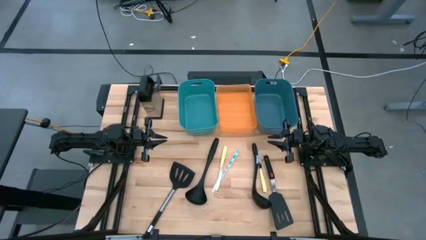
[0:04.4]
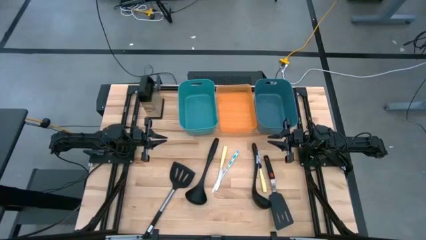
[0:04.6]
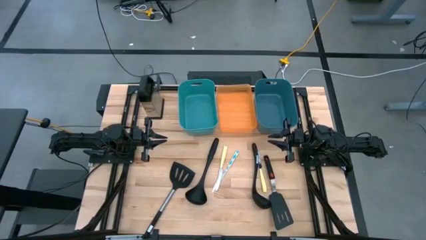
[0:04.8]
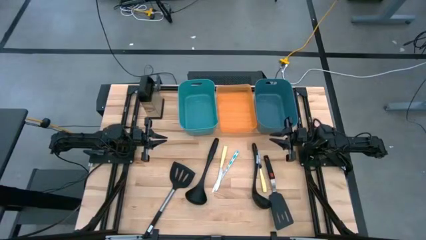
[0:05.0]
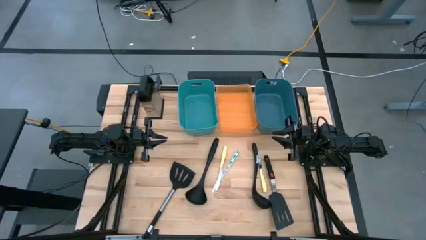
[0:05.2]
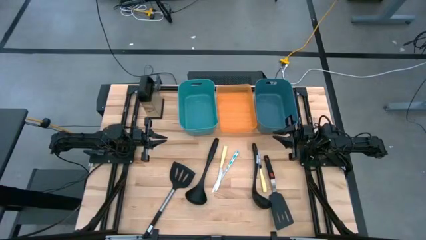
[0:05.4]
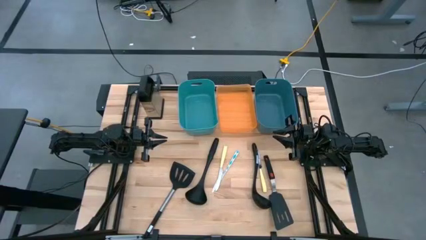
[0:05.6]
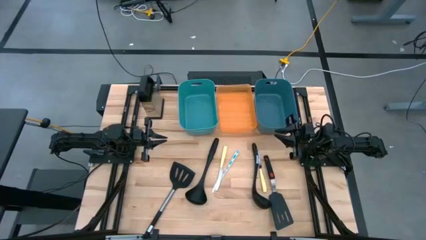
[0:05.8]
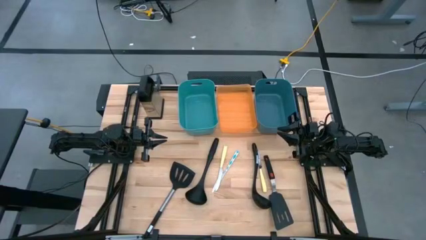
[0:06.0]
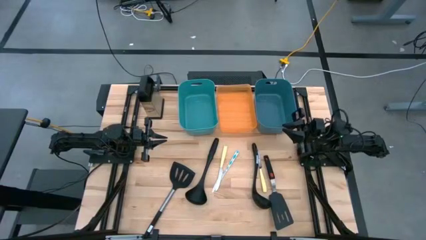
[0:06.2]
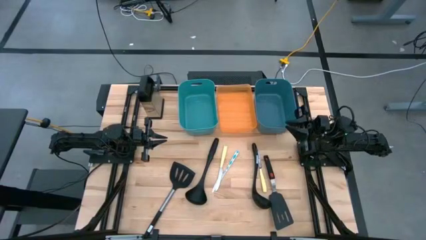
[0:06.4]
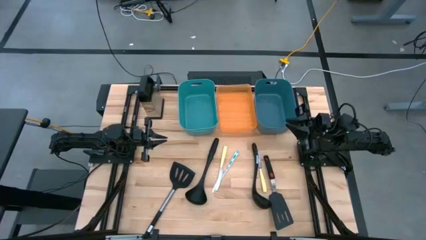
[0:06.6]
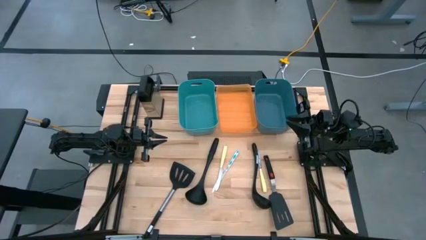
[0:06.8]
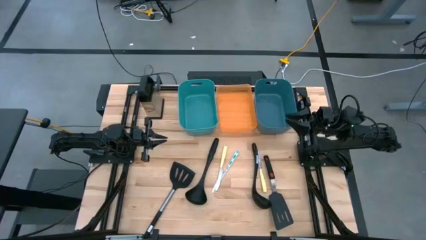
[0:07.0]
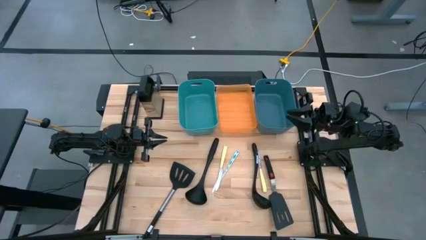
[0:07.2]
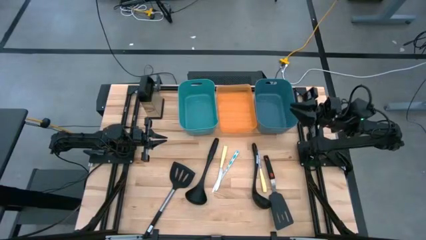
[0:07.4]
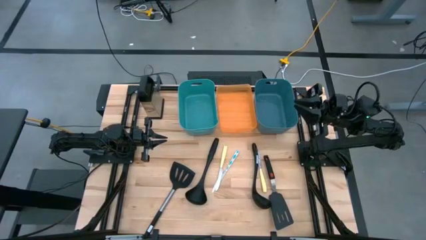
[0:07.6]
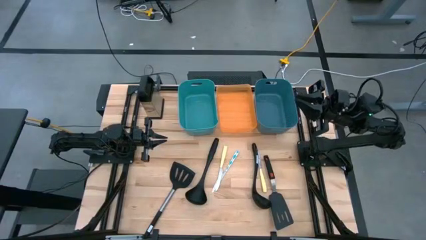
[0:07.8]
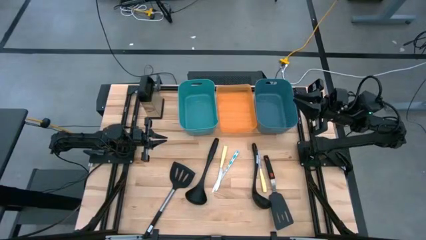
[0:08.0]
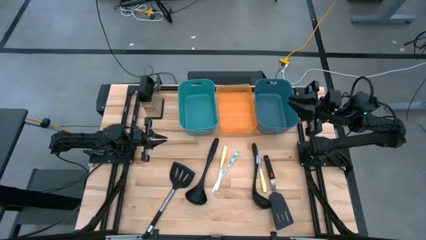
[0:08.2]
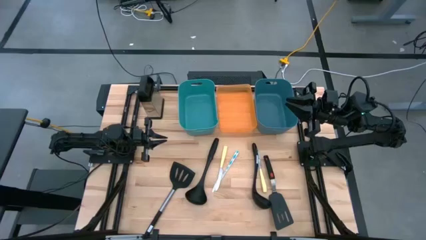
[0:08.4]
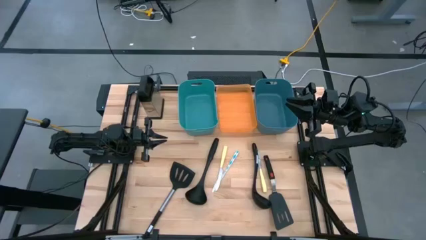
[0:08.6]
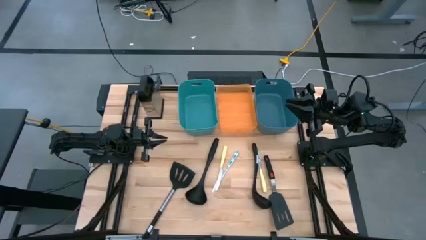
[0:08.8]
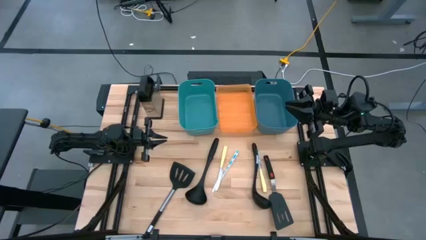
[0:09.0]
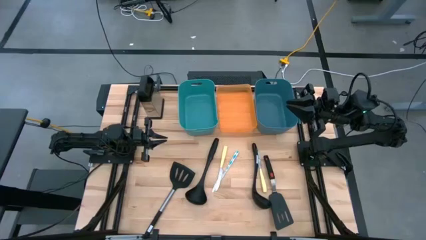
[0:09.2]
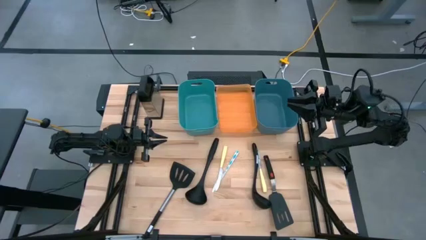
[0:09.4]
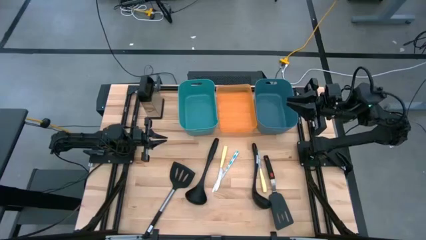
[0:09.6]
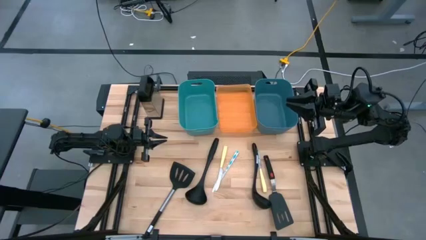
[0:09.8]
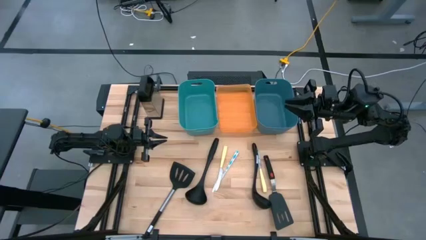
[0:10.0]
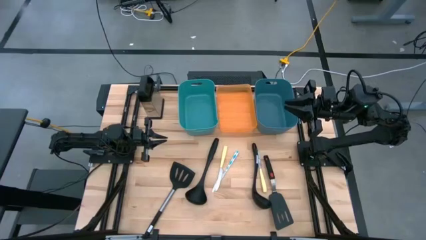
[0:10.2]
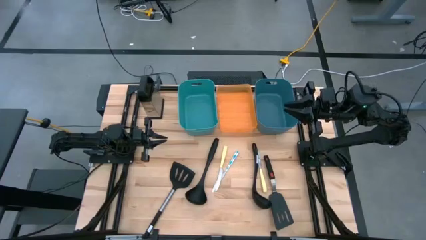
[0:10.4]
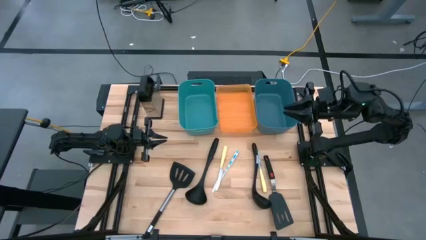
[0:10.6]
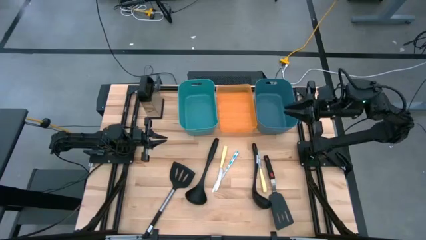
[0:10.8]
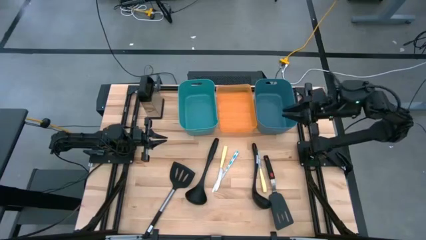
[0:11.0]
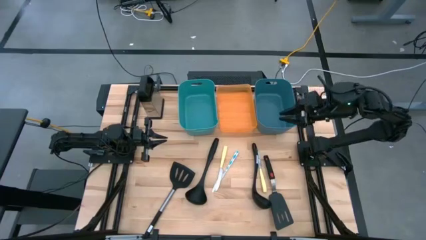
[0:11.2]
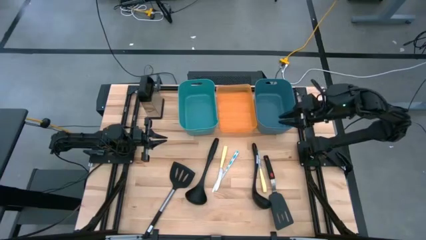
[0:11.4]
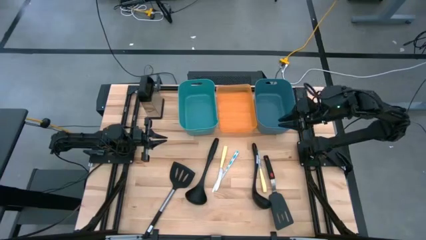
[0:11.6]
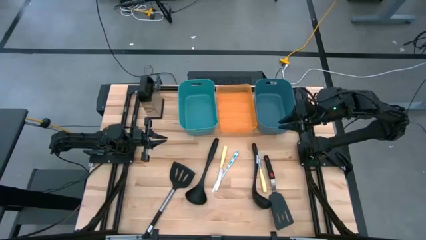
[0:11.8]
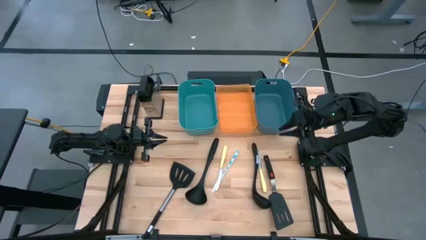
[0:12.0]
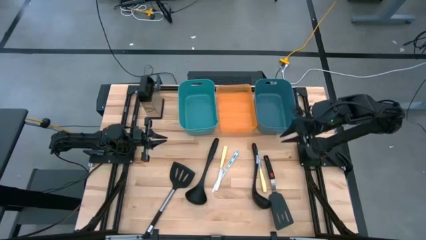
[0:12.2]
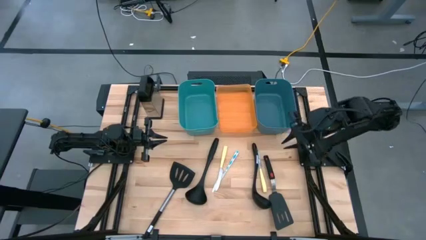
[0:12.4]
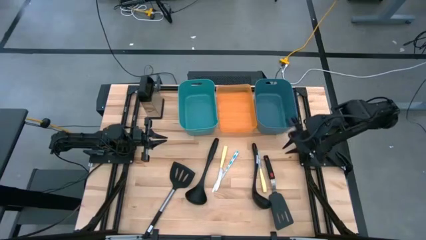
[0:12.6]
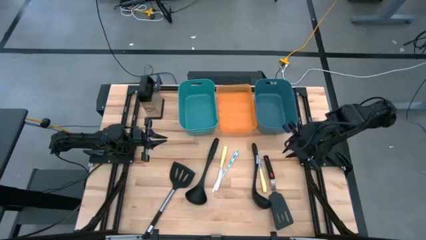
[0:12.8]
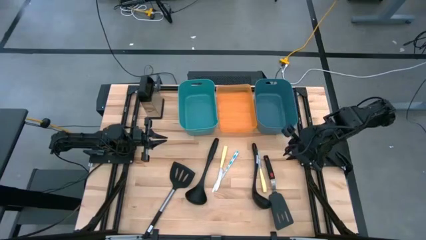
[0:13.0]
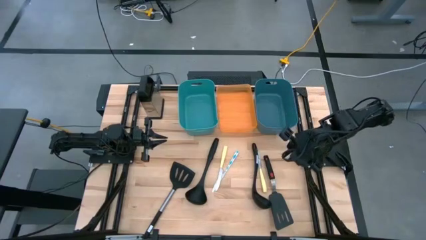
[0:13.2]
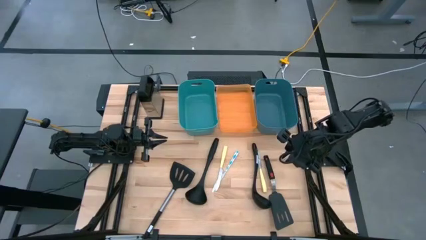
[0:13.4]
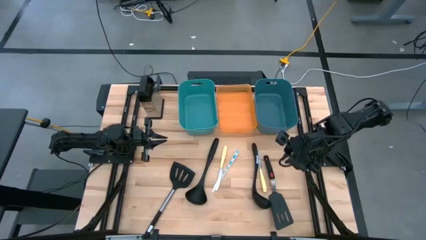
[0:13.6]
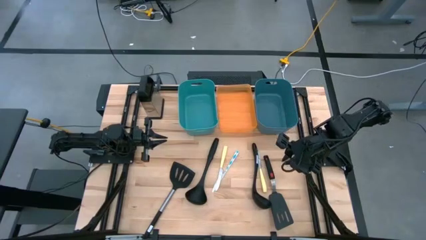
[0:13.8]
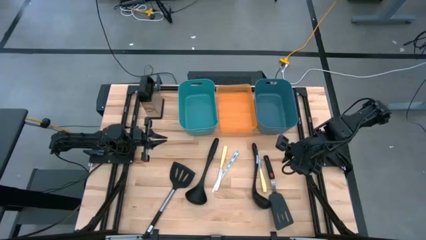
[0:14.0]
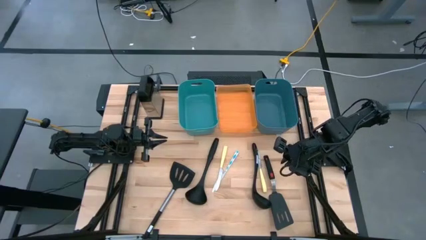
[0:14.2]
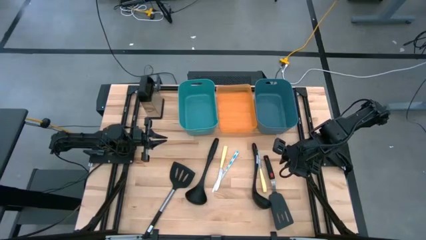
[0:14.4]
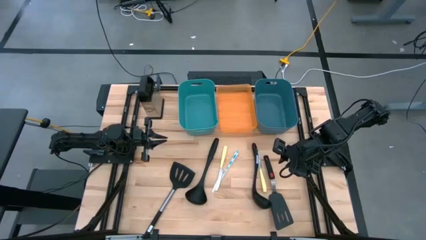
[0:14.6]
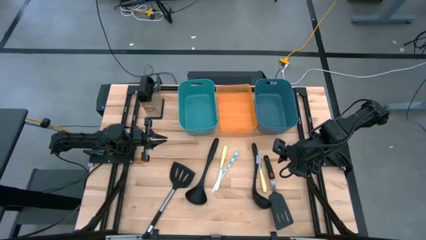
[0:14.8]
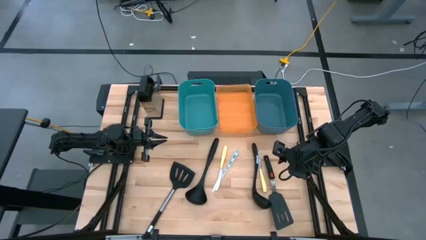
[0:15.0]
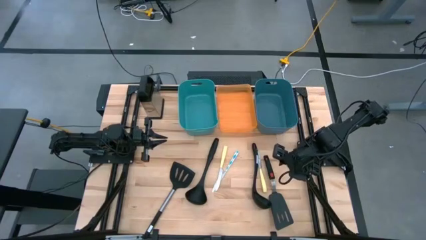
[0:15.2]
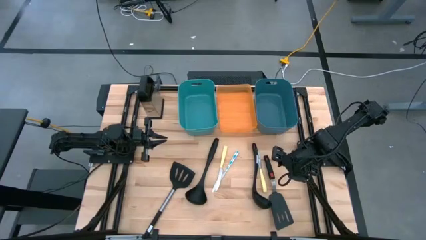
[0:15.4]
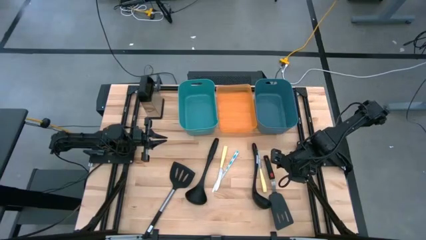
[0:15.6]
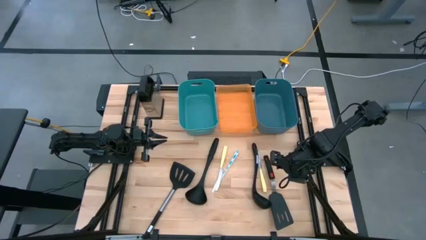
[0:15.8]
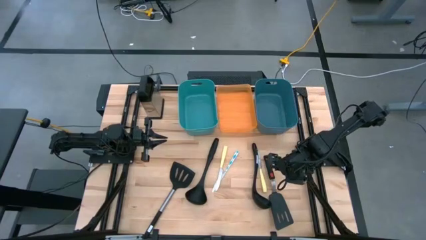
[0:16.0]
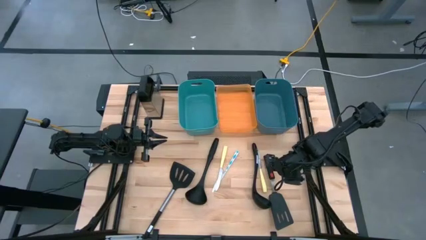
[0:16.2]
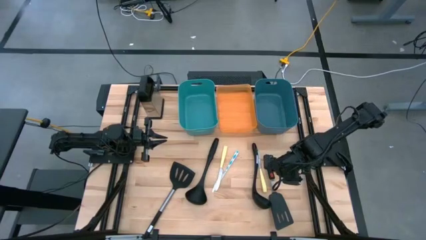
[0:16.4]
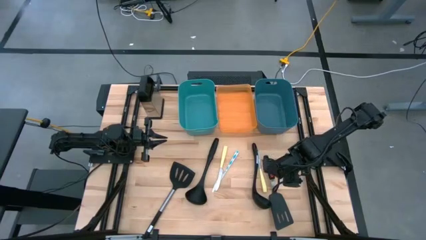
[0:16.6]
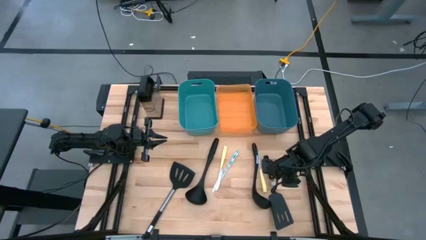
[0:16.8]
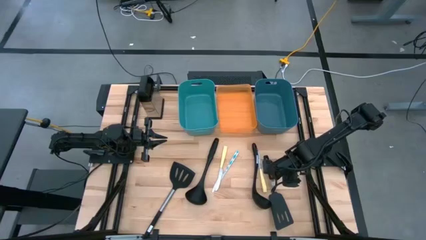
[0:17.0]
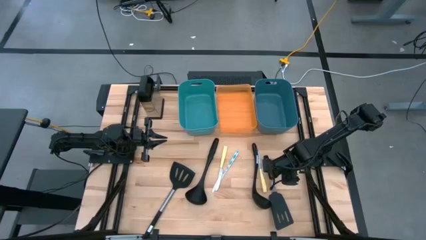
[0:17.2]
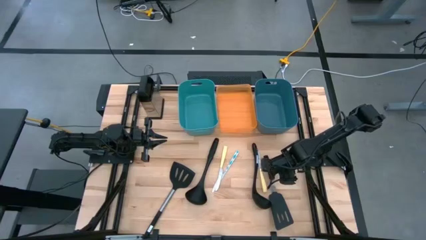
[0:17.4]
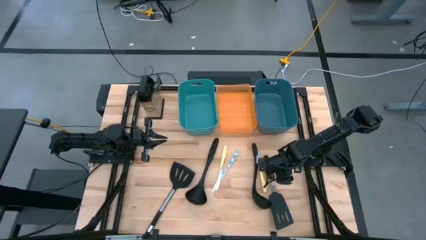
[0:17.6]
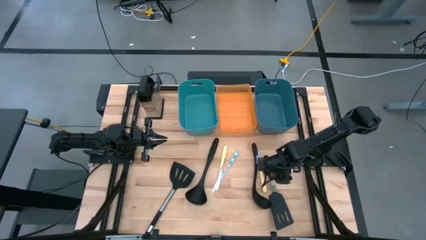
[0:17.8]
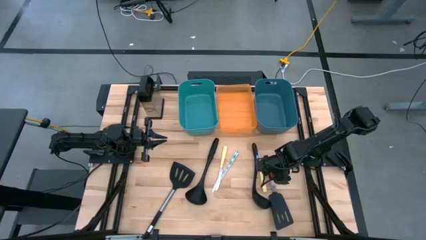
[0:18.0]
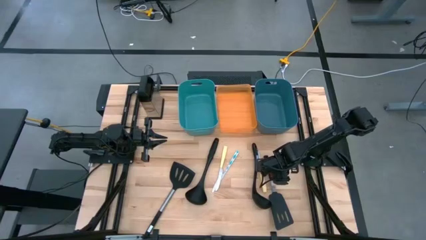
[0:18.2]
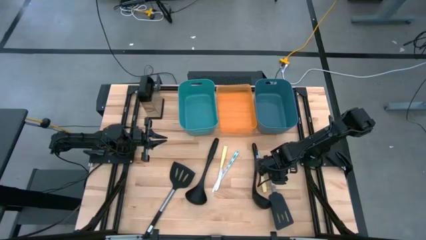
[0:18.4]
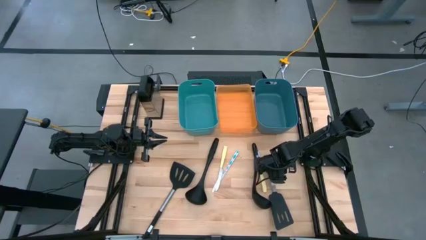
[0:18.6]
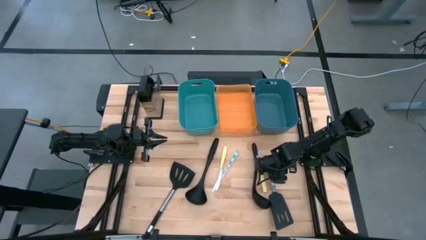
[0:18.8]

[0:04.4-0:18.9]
Task: Pick & Place Kitchen Items
Put the right black spatula into the green bin
